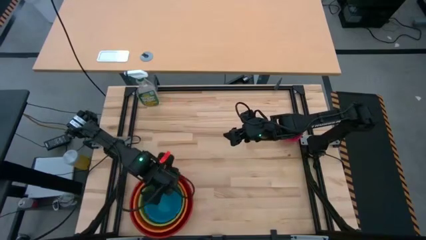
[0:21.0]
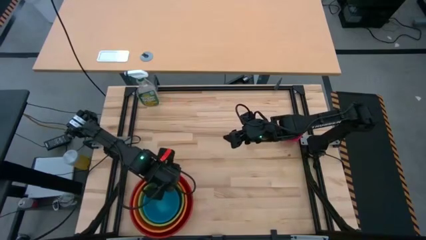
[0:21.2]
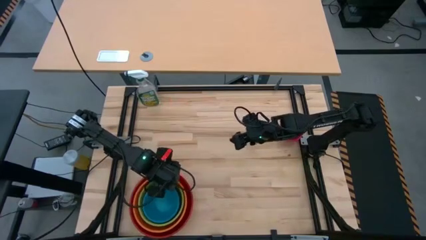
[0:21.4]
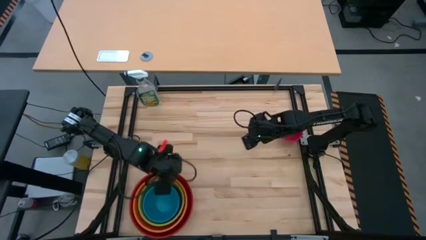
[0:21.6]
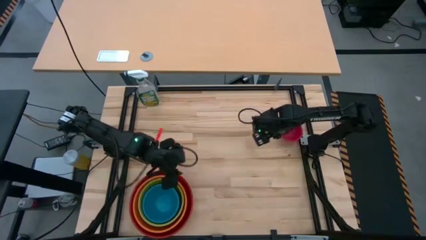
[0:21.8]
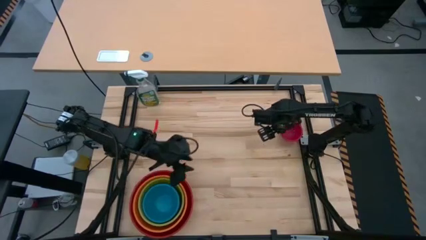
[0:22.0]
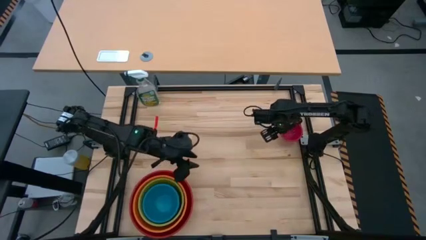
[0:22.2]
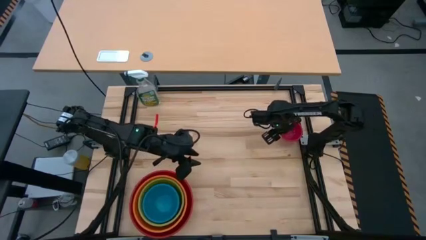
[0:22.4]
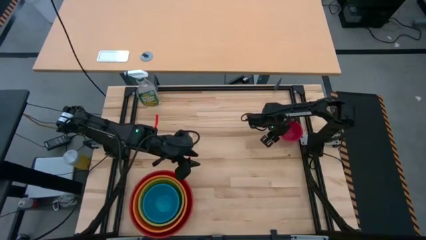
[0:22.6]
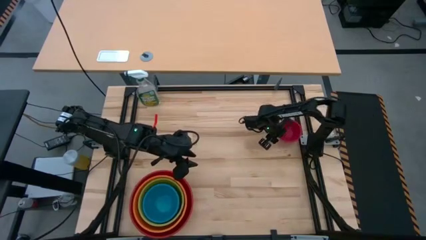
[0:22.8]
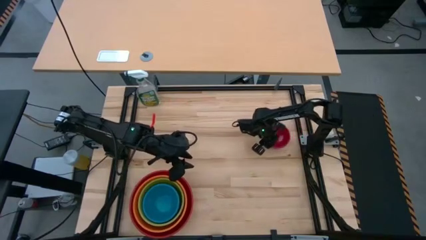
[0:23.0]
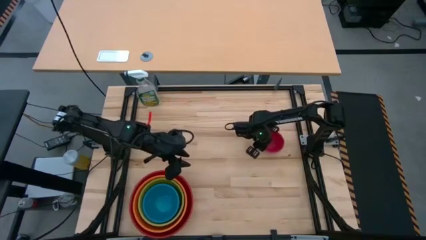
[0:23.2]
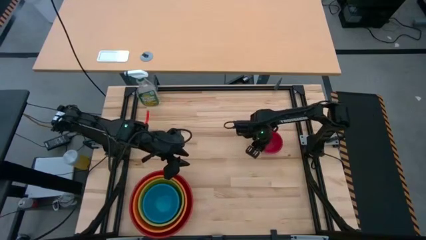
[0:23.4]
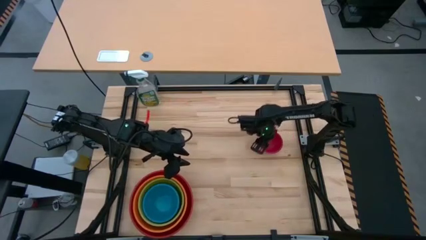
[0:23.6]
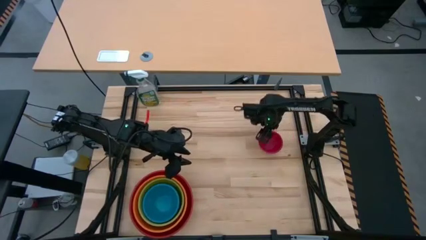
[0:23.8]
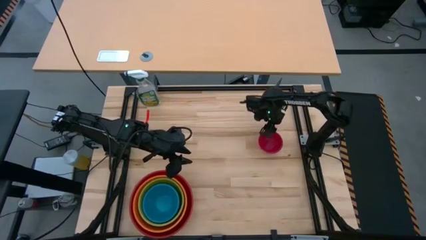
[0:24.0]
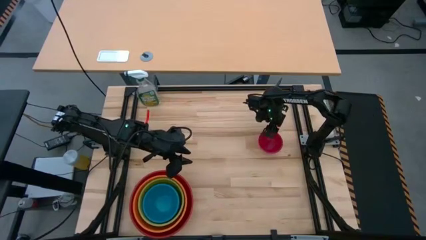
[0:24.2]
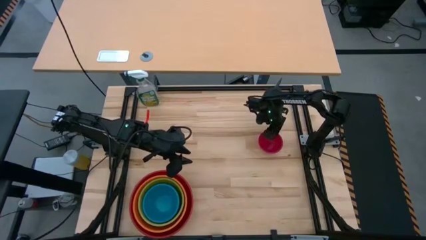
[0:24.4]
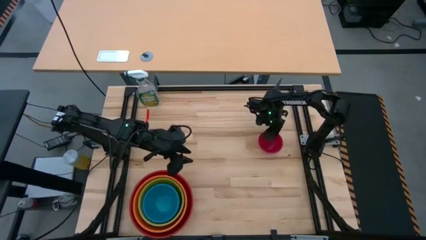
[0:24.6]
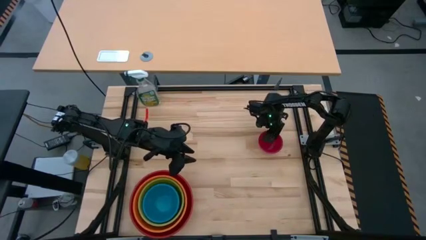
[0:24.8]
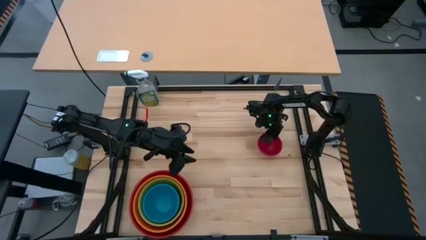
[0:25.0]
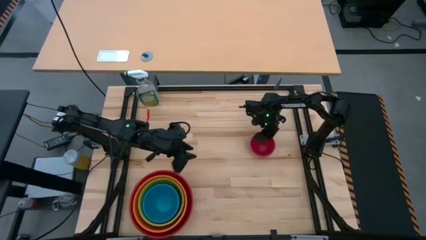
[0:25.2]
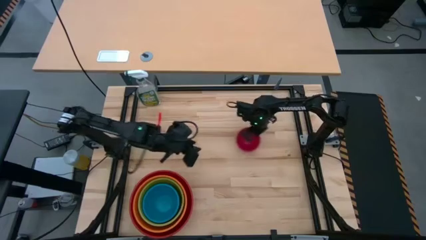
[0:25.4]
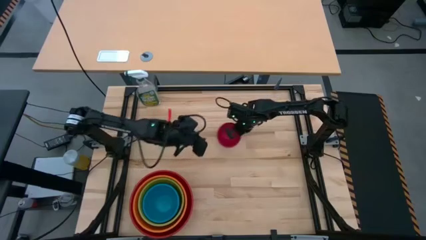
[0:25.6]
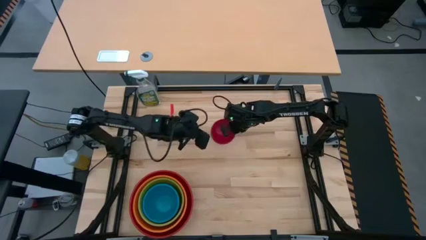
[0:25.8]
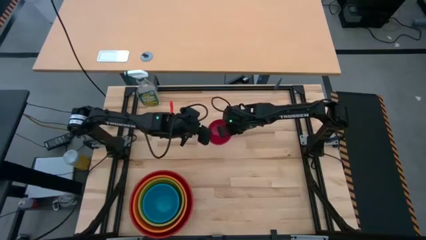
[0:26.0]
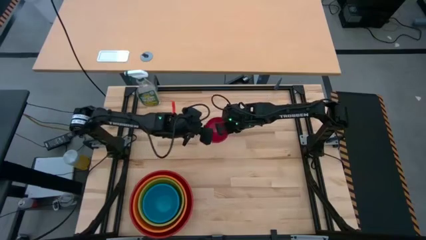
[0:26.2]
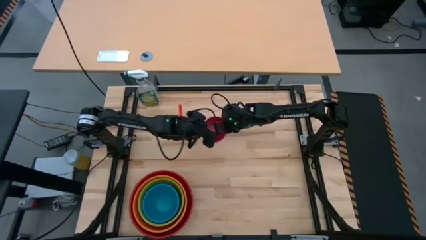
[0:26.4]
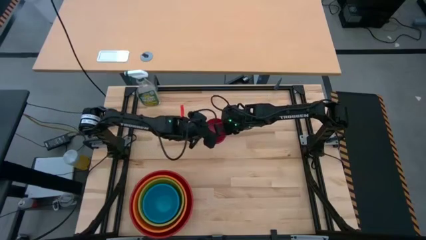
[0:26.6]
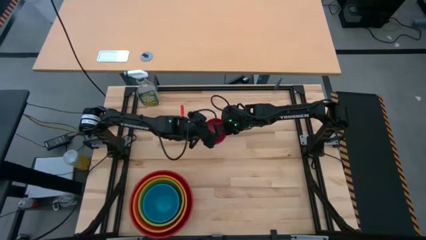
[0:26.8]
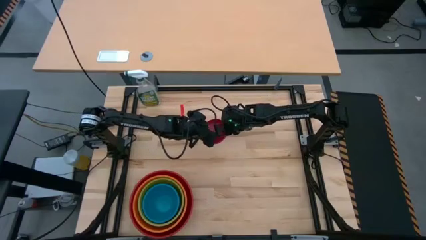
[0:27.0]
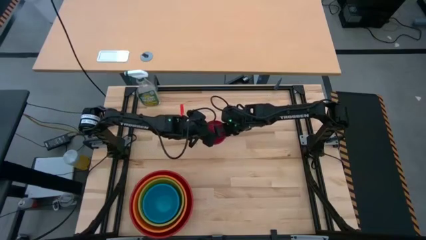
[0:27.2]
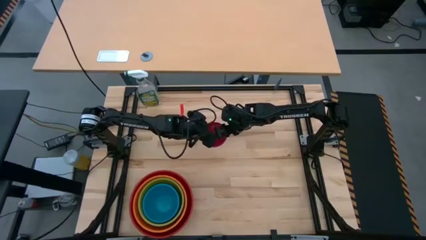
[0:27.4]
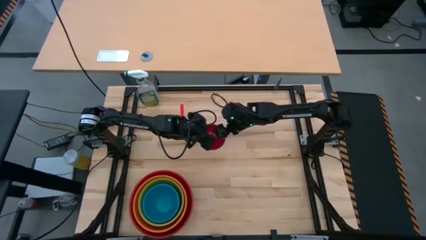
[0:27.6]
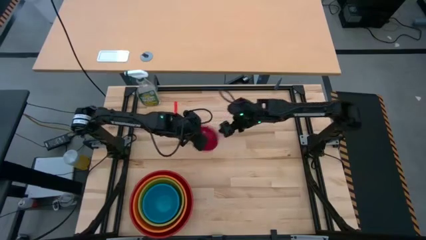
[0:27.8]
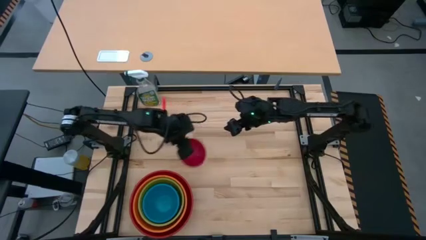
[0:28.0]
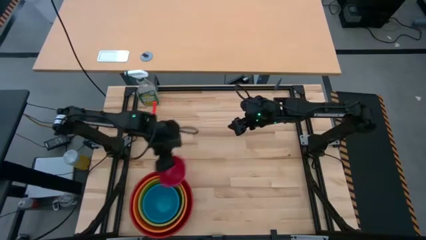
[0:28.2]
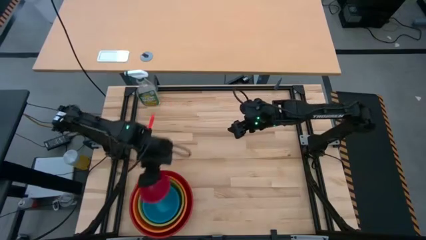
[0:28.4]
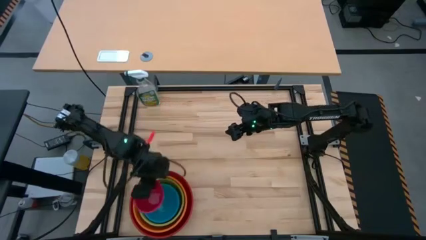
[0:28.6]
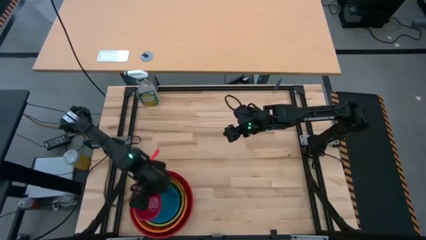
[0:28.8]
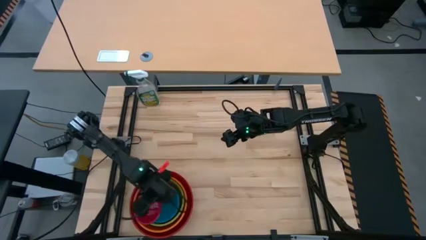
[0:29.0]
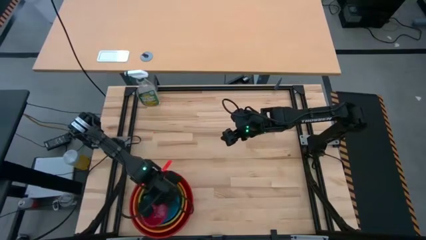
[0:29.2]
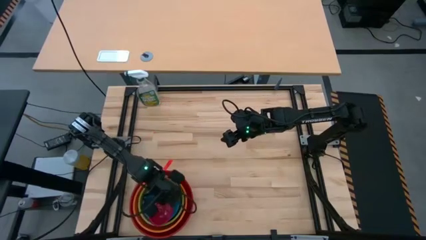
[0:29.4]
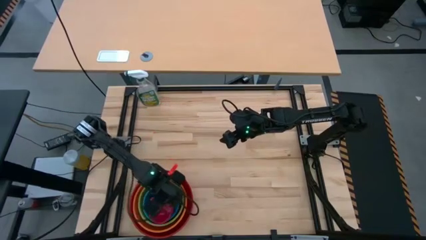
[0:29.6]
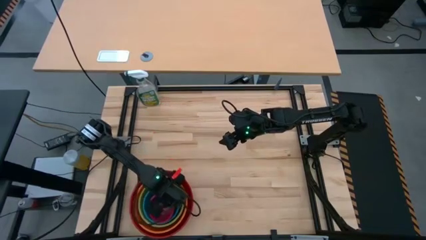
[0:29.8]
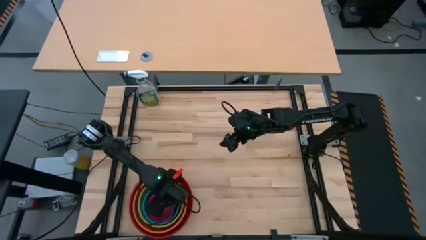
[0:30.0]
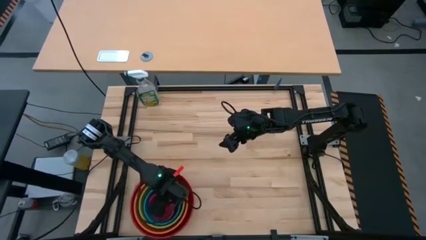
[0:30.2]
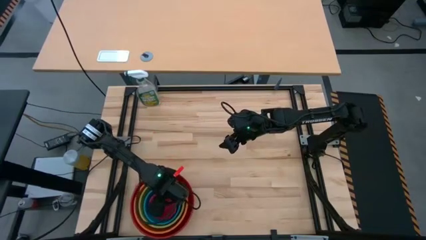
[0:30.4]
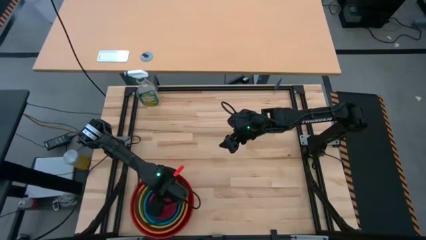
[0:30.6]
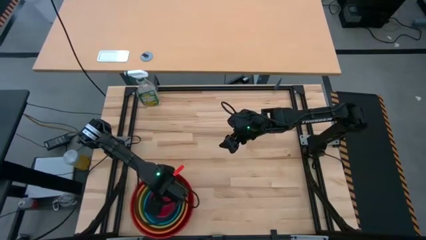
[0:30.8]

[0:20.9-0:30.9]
Stack the pink bowl on top of the blue bowl

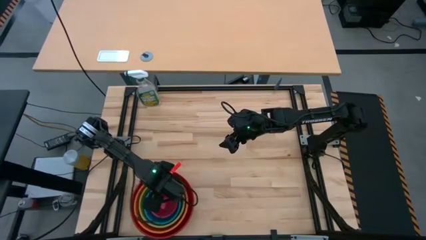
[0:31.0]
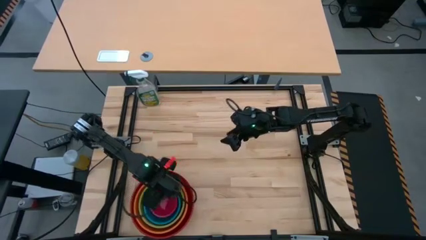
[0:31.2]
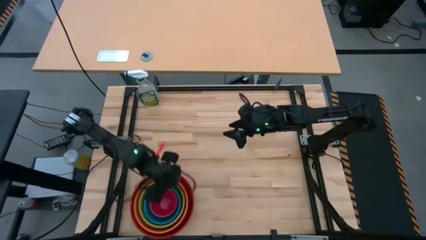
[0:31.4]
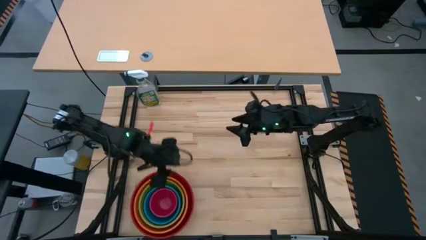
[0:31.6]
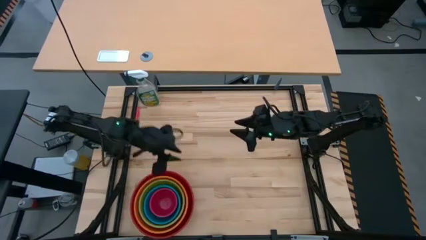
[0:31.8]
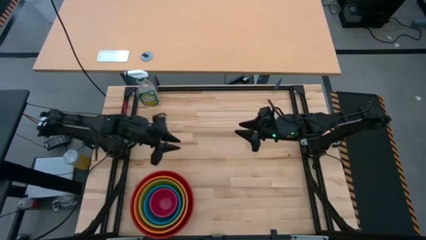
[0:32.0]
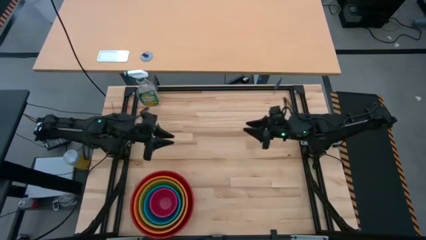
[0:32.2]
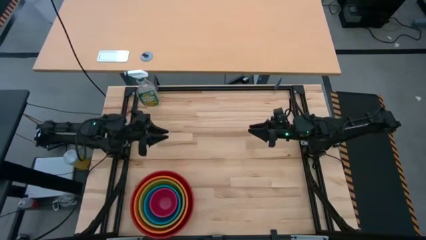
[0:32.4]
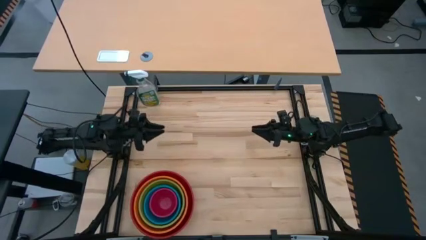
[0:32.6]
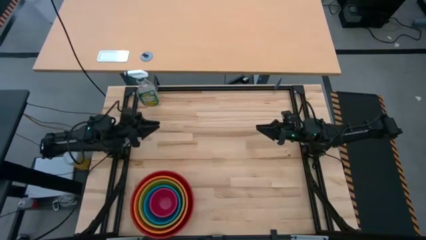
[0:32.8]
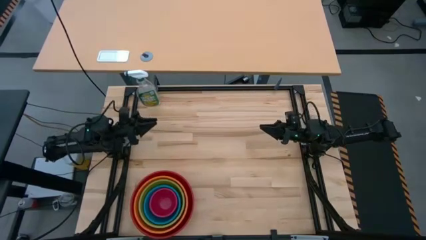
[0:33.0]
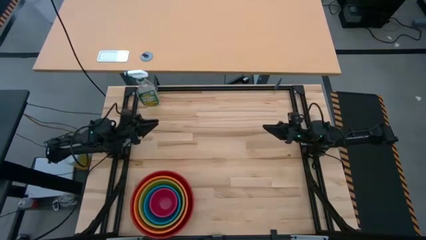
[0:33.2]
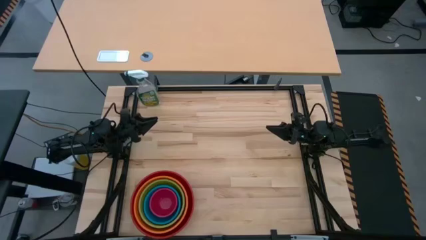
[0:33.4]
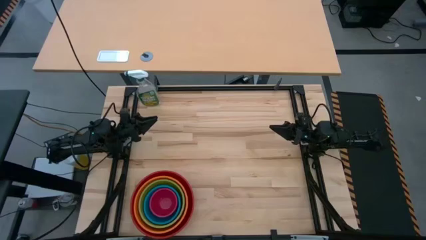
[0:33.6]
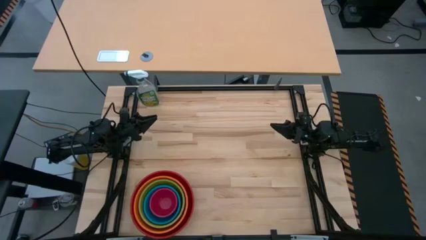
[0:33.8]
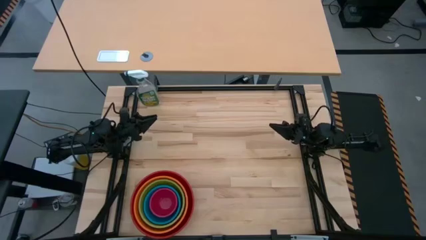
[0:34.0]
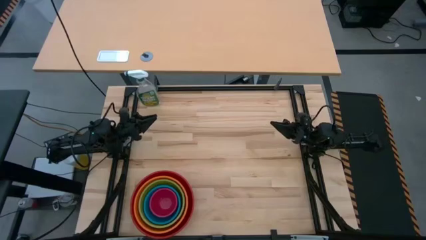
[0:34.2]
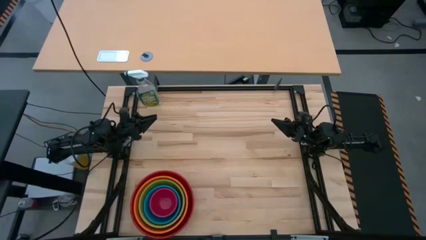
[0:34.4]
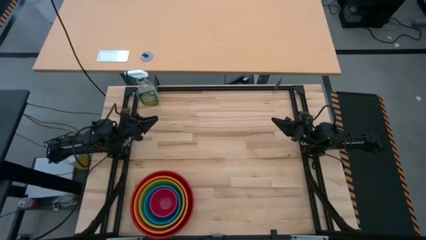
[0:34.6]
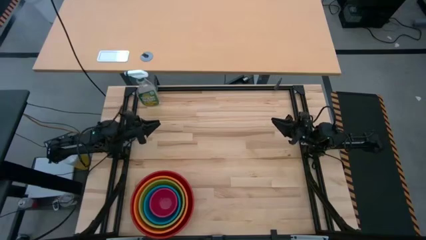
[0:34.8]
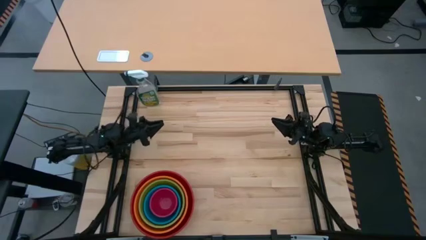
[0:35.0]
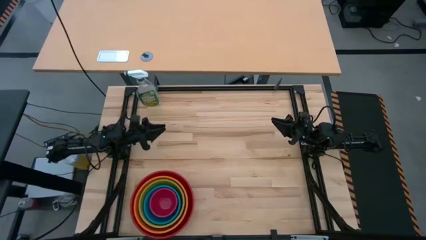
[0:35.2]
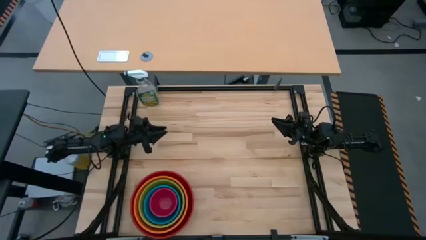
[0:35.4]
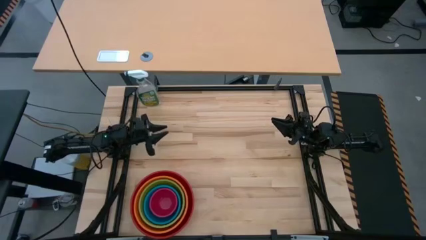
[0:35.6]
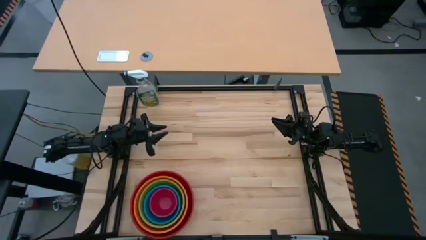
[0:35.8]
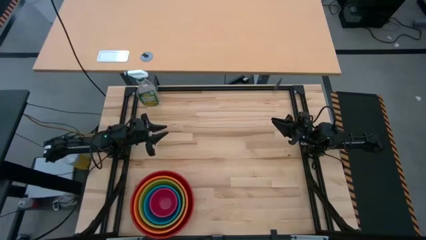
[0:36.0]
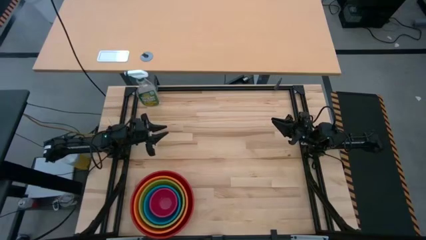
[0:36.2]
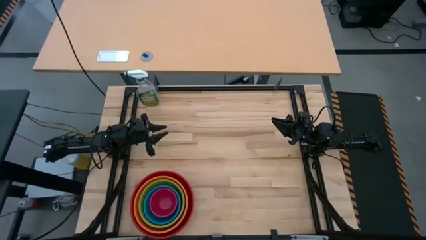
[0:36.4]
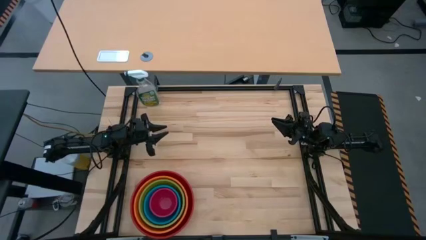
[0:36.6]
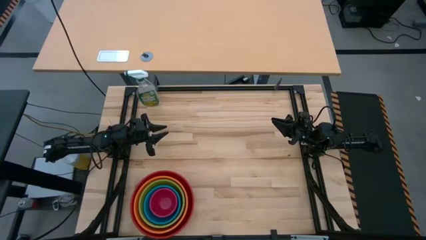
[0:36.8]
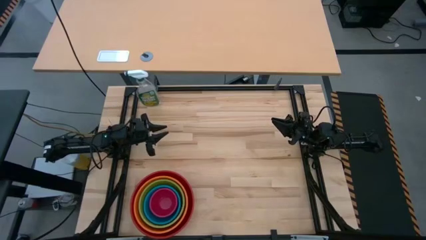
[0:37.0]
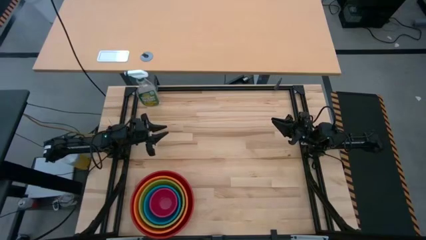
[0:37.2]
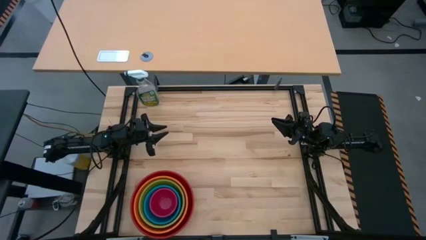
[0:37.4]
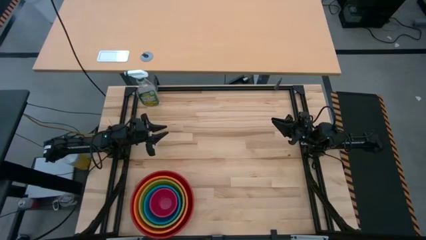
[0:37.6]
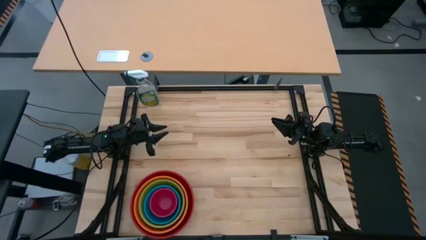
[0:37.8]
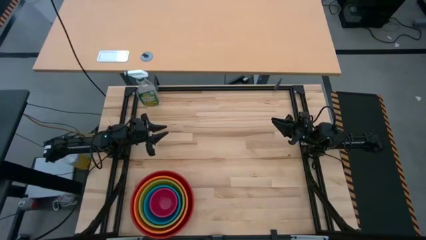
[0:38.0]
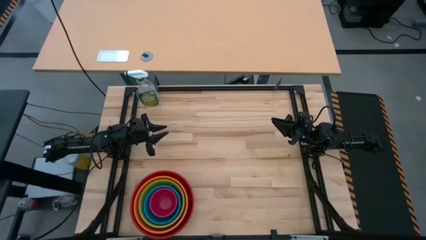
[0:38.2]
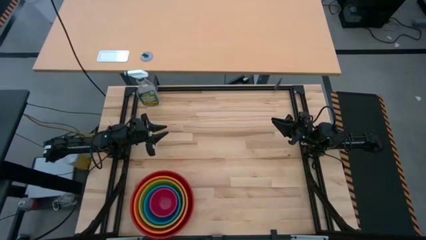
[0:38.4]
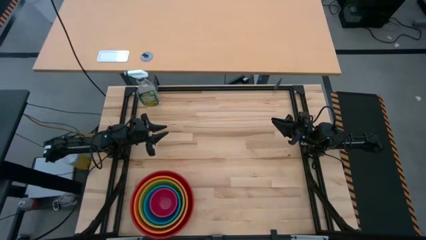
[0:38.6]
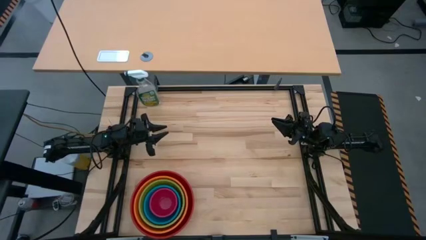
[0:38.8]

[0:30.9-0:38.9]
Return to Home Position
